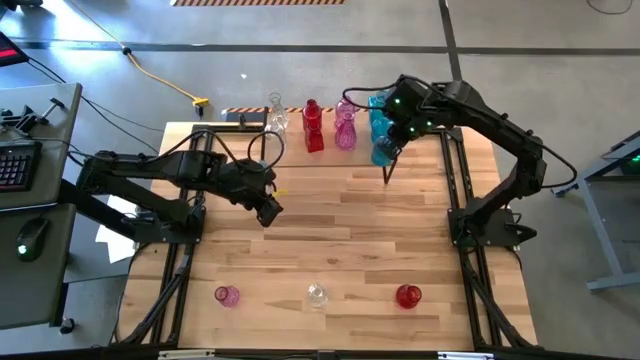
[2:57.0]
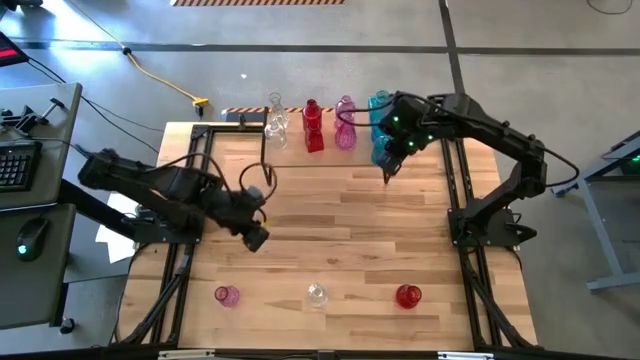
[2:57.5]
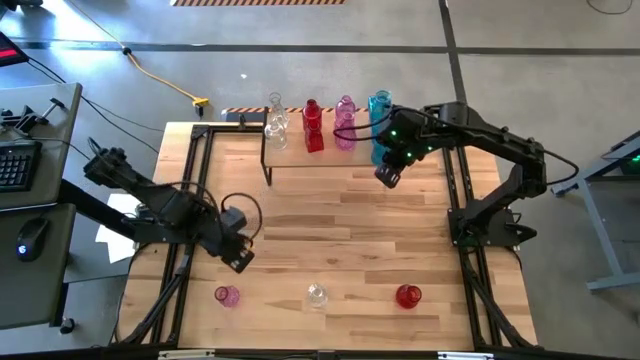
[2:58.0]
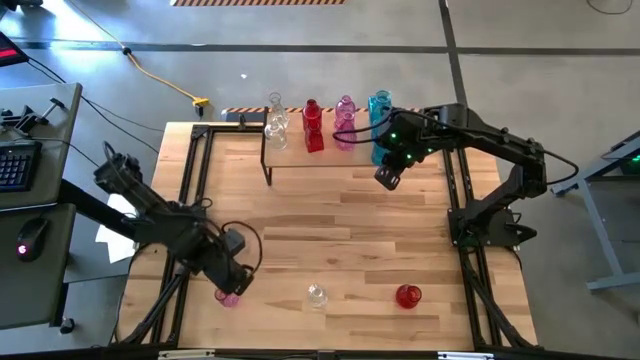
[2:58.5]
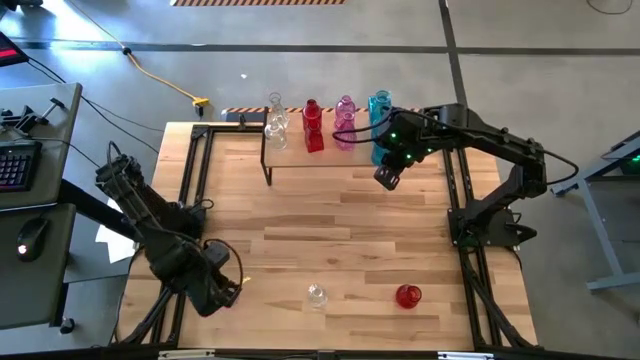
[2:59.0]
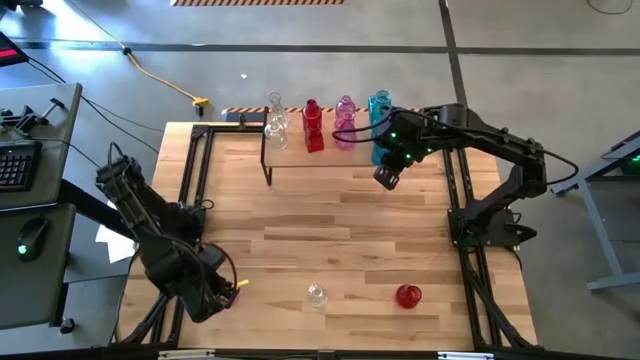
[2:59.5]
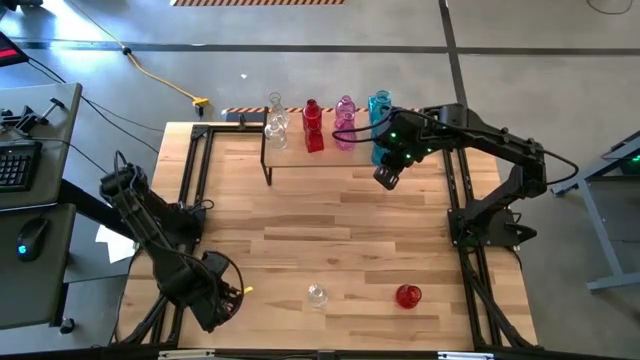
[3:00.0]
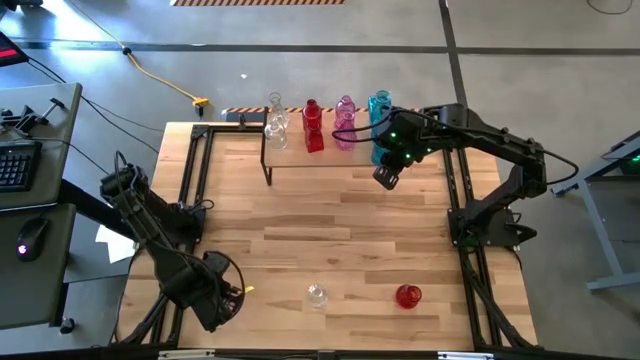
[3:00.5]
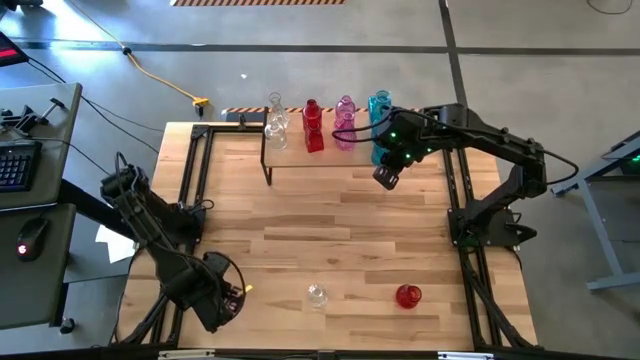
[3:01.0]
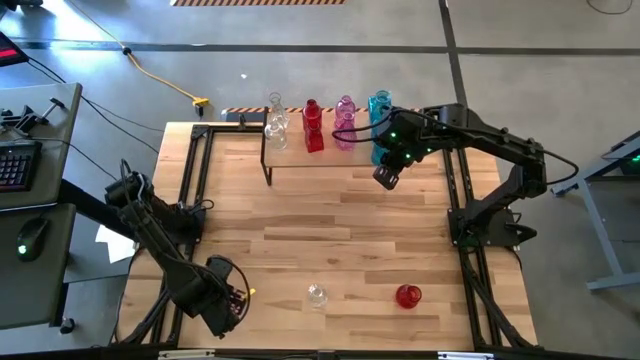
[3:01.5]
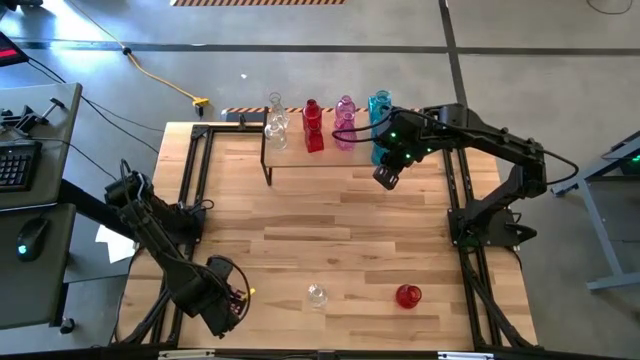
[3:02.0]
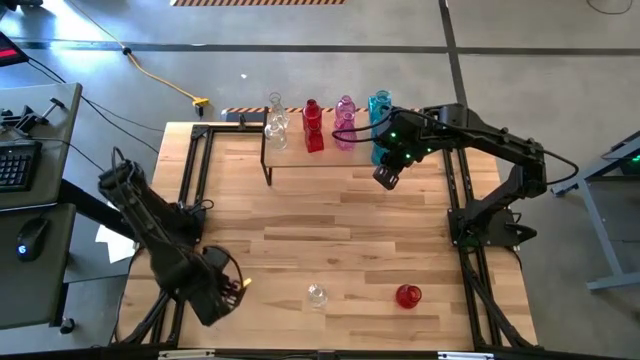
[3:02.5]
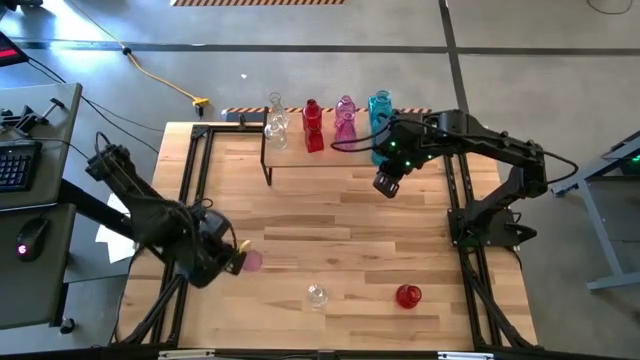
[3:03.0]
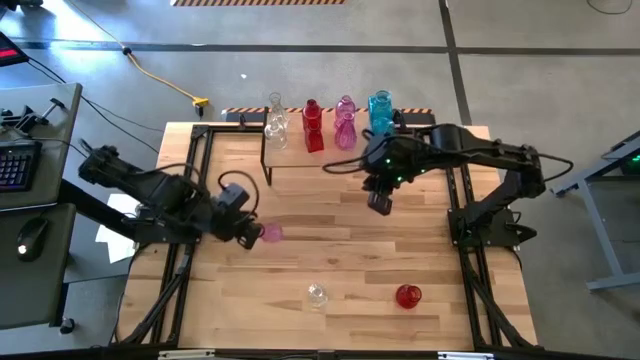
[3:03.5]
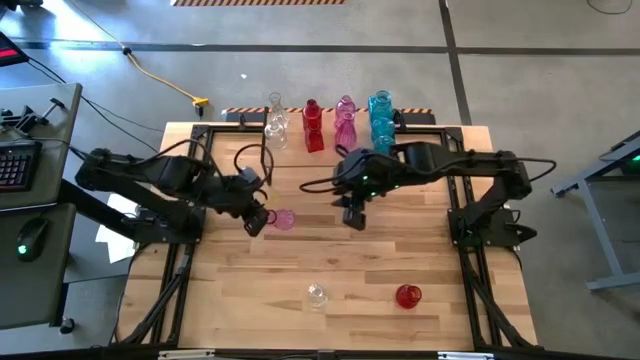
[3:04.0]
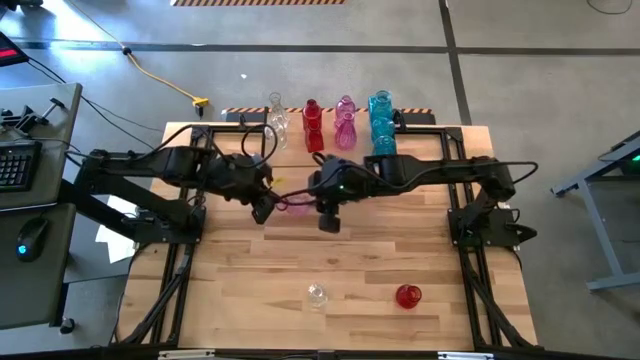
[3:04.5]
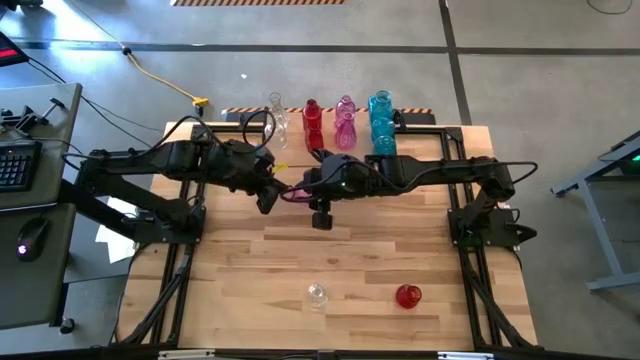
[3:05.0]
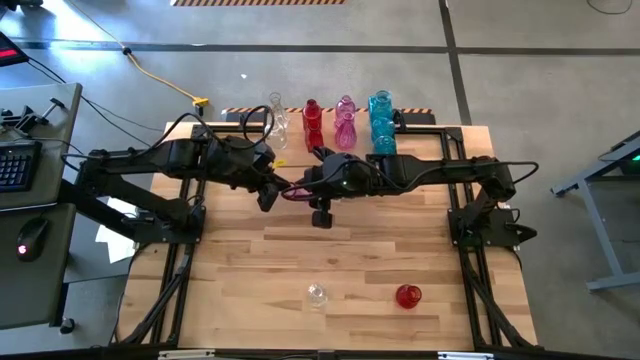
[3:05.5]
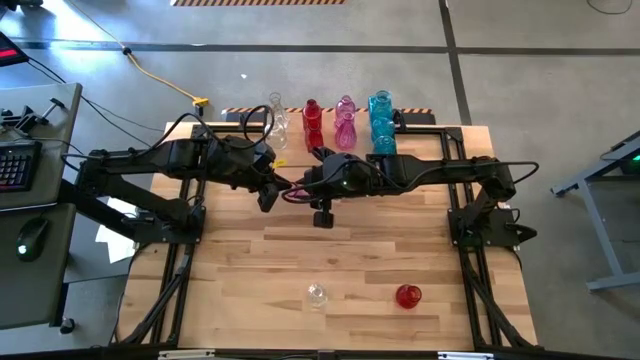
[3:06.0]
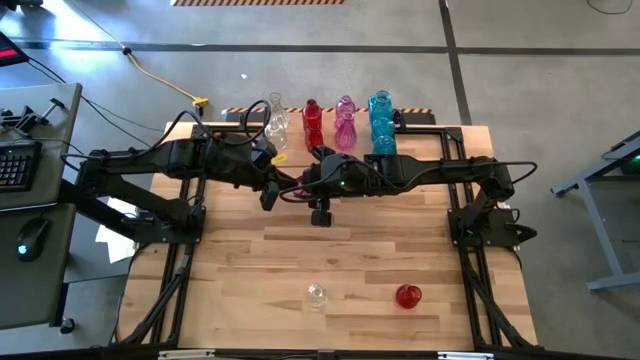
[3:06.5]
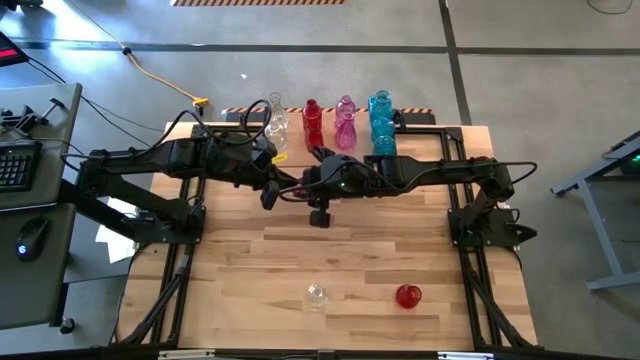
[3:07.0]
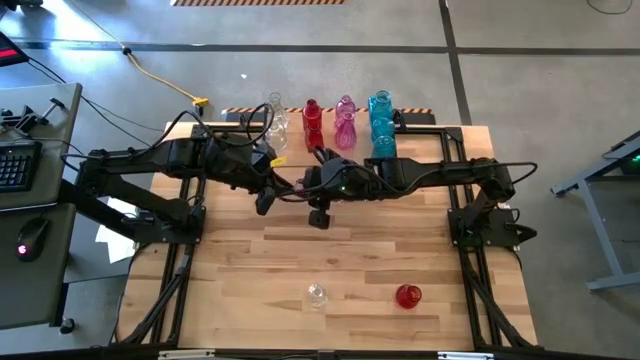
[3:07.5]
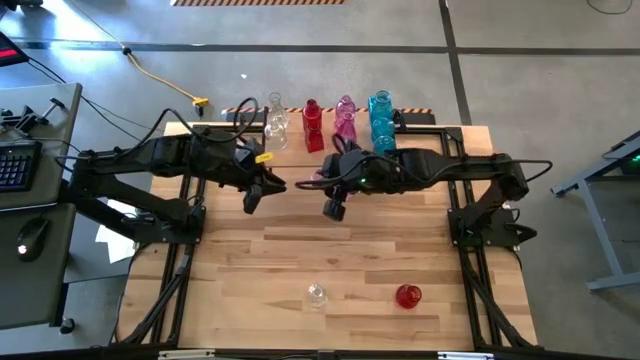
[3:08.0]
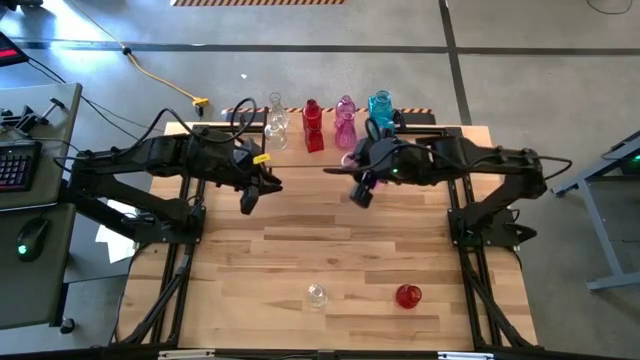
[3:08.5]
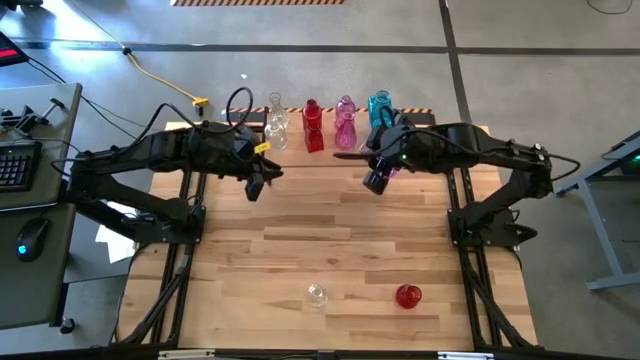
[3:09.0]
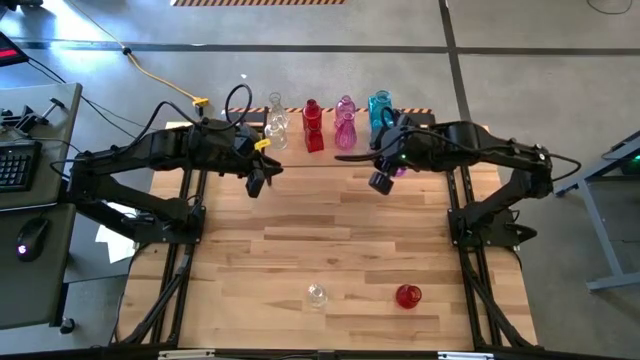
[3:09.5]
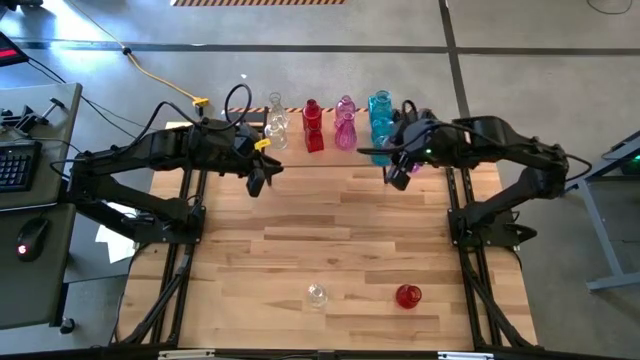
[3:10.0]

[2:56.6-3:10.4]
Task: sort vases onto shelf
Put the pink vase on the shelf aligned with the other pink vases
